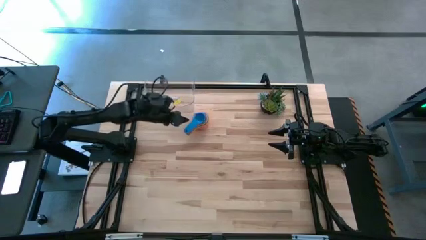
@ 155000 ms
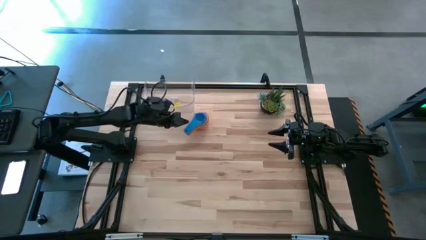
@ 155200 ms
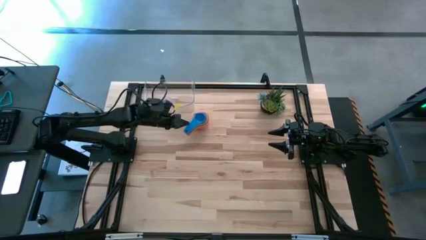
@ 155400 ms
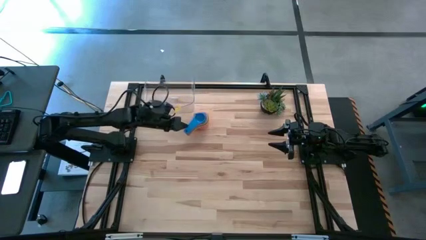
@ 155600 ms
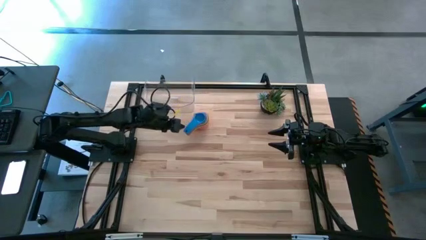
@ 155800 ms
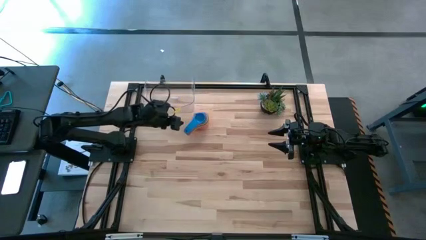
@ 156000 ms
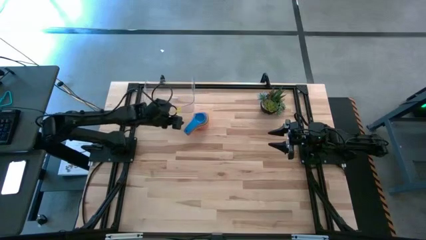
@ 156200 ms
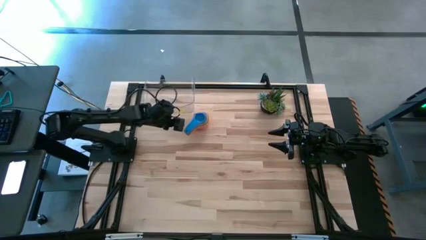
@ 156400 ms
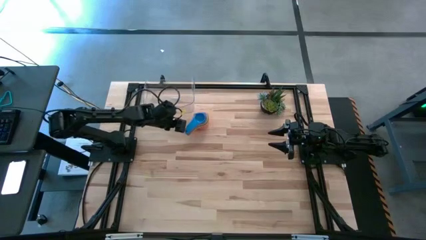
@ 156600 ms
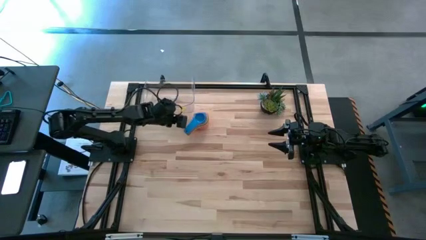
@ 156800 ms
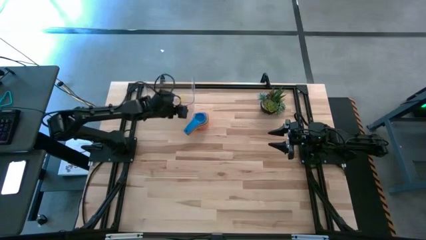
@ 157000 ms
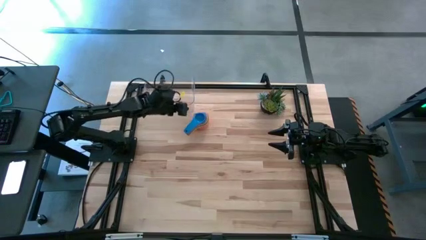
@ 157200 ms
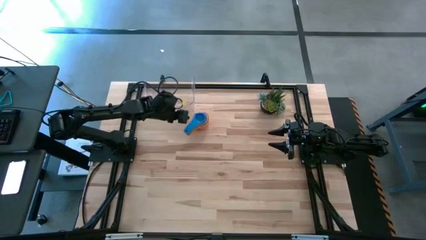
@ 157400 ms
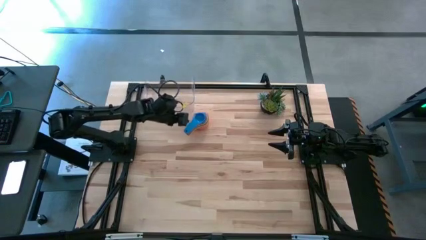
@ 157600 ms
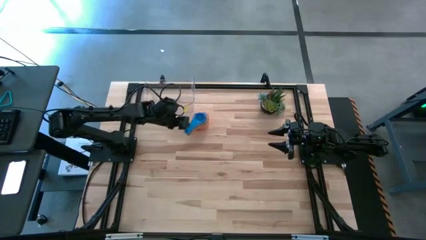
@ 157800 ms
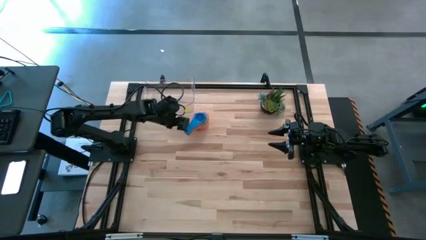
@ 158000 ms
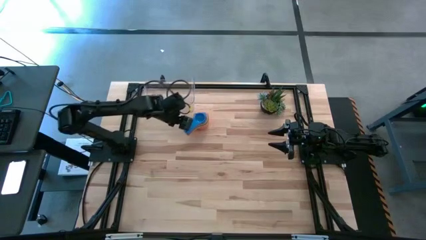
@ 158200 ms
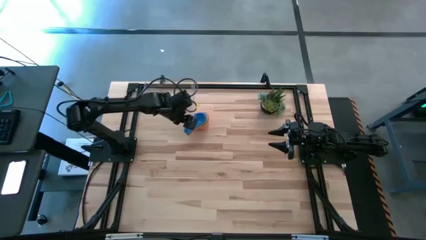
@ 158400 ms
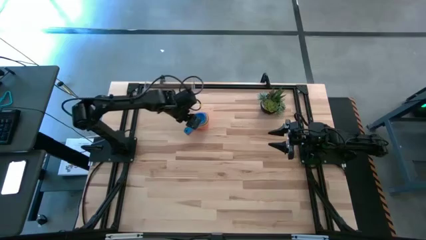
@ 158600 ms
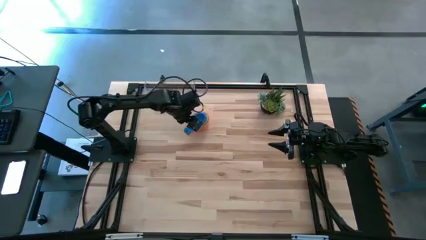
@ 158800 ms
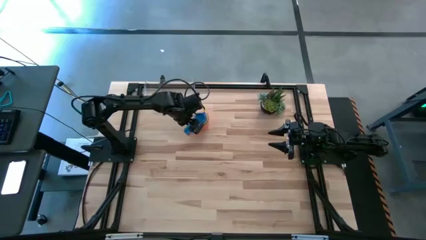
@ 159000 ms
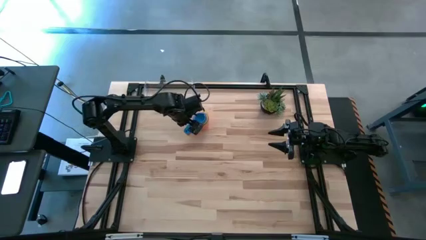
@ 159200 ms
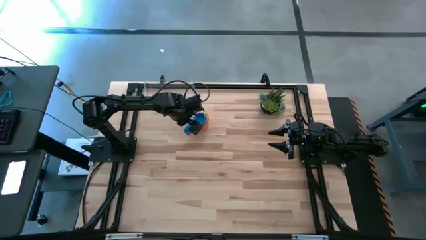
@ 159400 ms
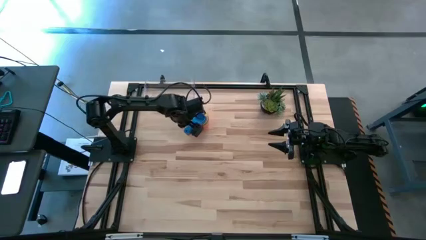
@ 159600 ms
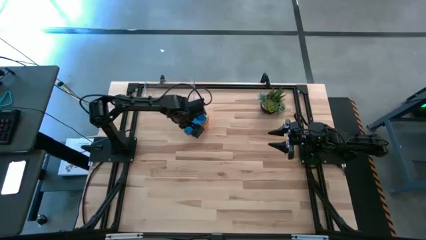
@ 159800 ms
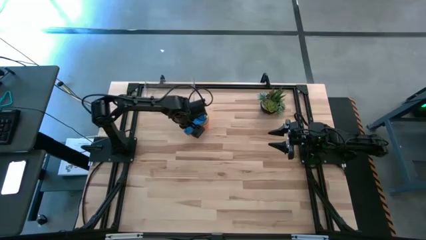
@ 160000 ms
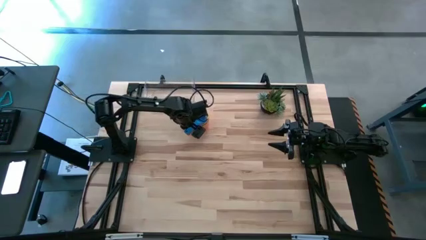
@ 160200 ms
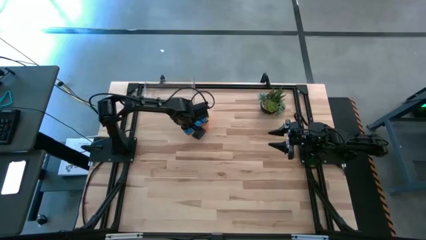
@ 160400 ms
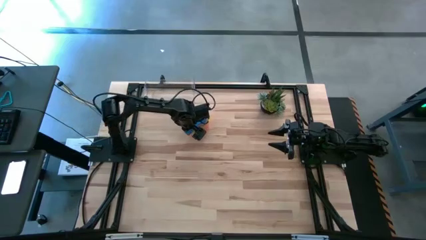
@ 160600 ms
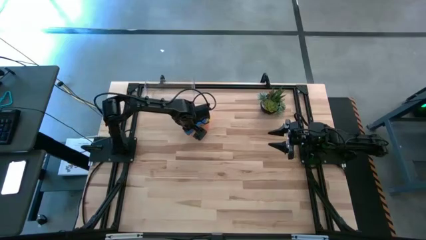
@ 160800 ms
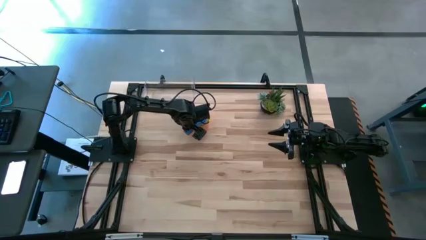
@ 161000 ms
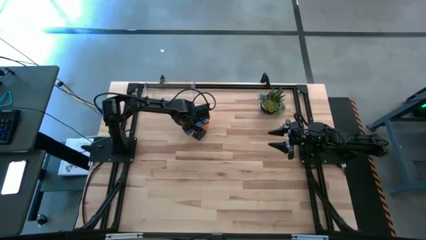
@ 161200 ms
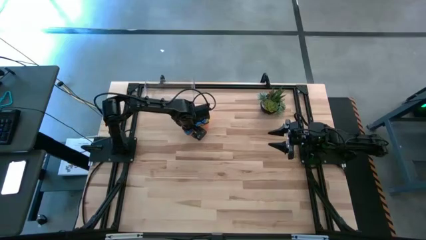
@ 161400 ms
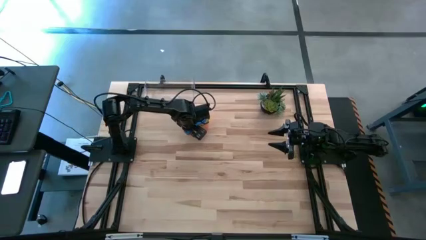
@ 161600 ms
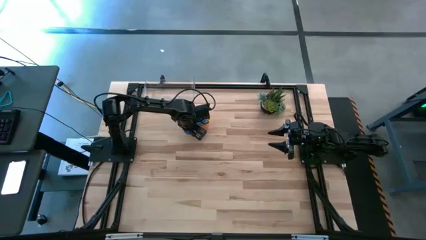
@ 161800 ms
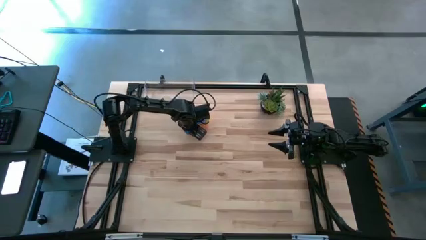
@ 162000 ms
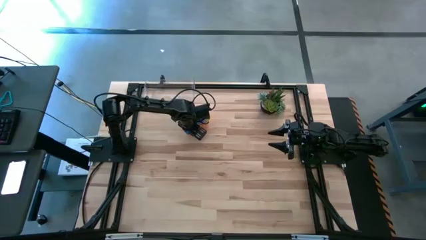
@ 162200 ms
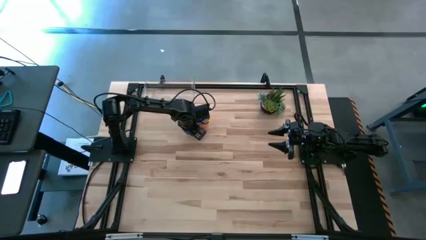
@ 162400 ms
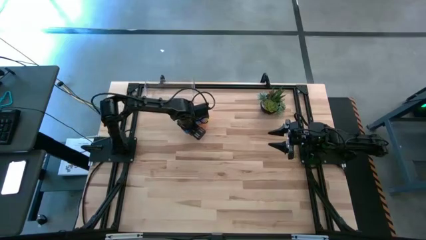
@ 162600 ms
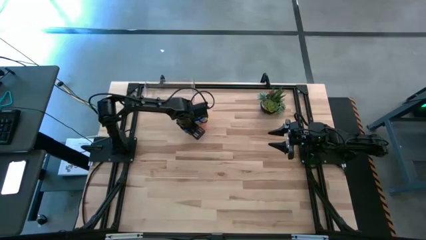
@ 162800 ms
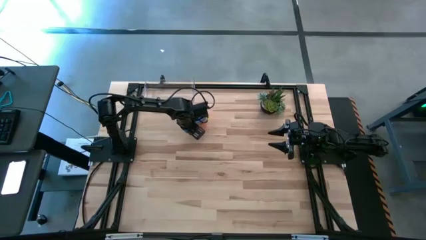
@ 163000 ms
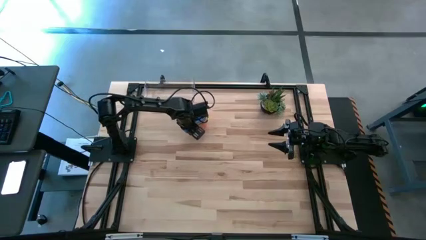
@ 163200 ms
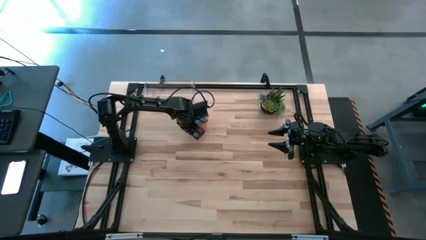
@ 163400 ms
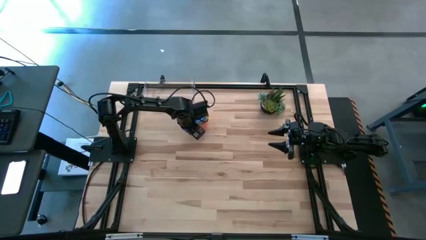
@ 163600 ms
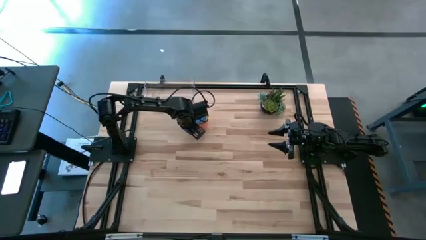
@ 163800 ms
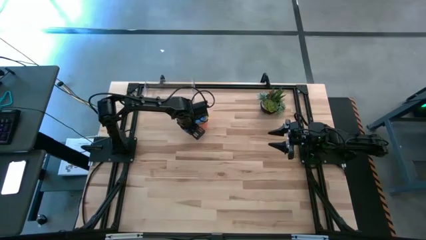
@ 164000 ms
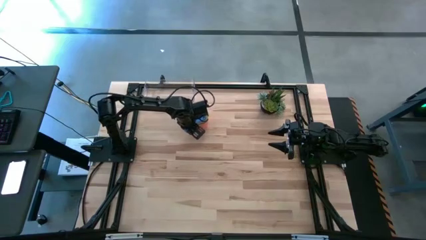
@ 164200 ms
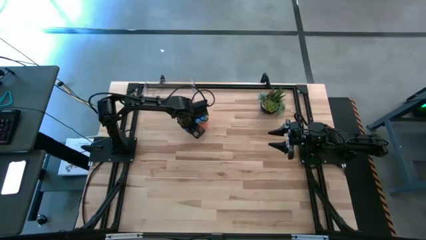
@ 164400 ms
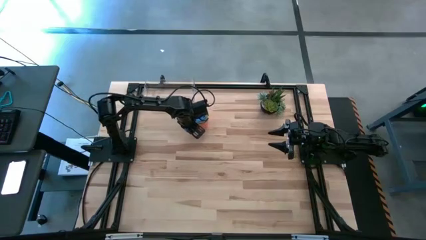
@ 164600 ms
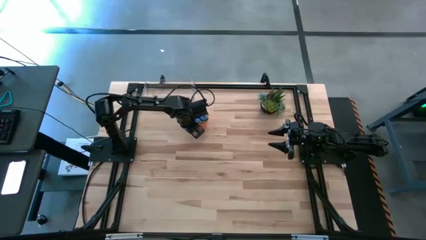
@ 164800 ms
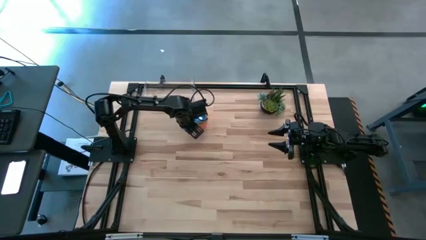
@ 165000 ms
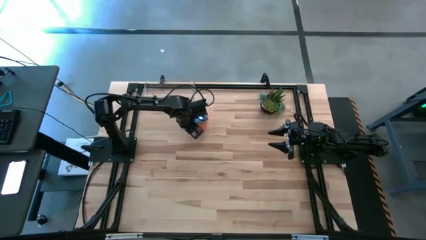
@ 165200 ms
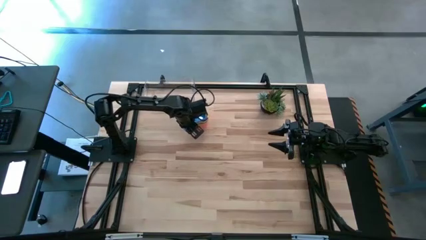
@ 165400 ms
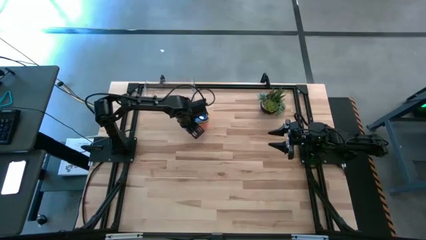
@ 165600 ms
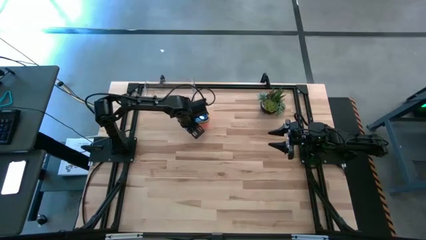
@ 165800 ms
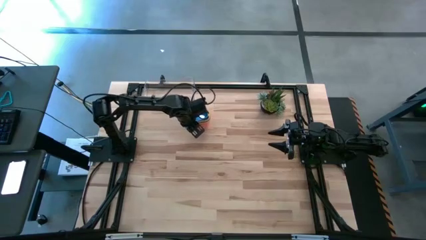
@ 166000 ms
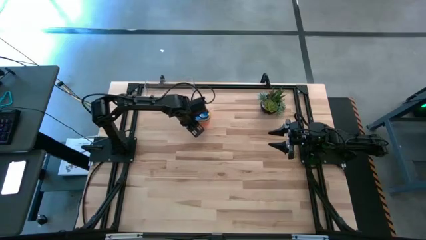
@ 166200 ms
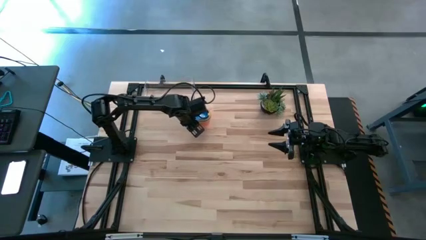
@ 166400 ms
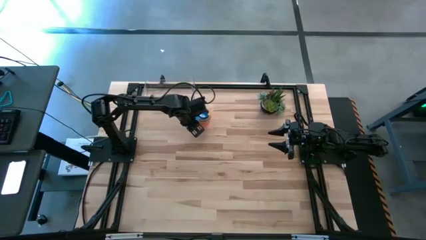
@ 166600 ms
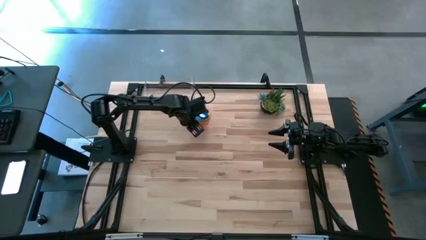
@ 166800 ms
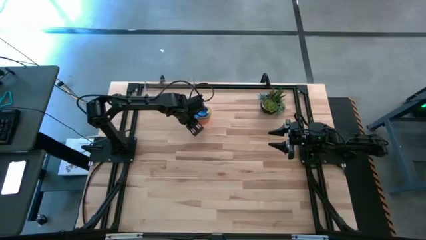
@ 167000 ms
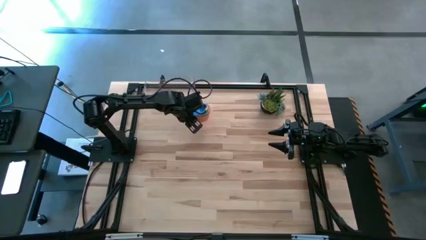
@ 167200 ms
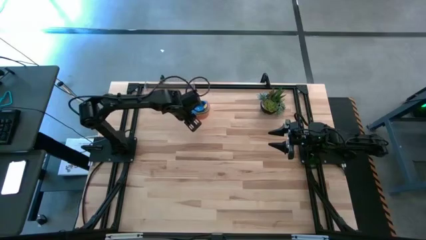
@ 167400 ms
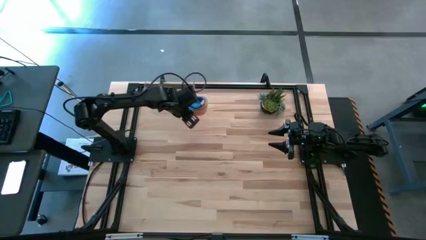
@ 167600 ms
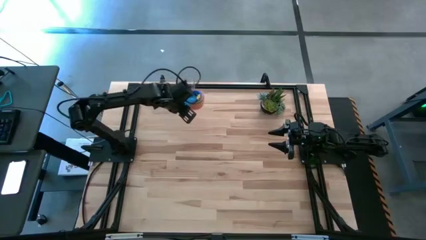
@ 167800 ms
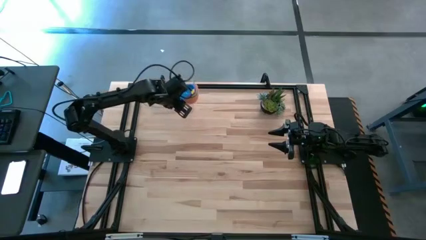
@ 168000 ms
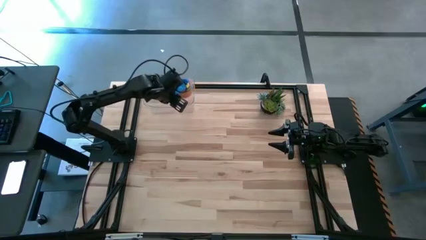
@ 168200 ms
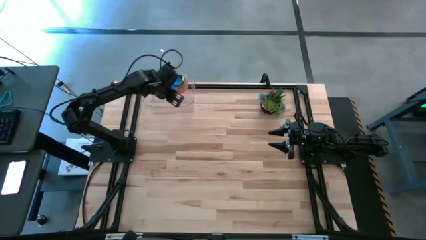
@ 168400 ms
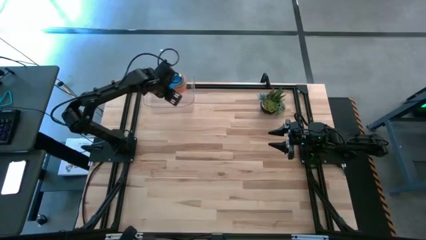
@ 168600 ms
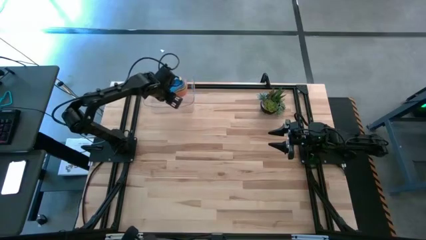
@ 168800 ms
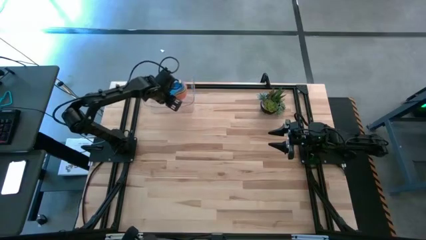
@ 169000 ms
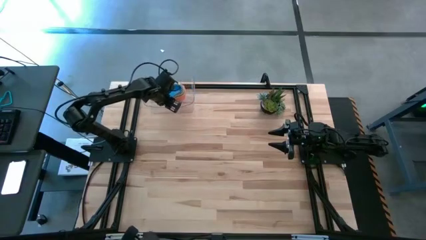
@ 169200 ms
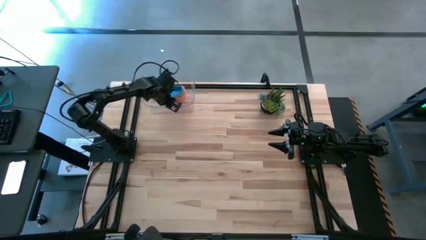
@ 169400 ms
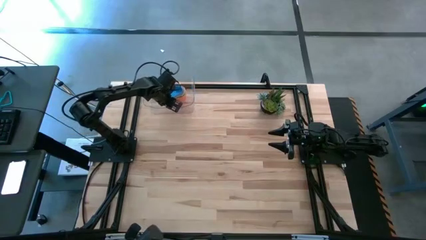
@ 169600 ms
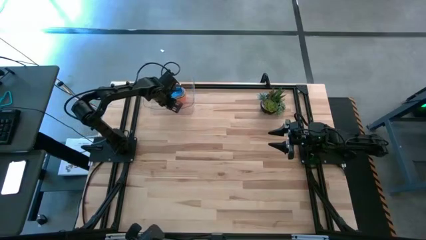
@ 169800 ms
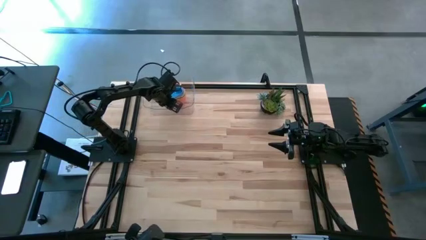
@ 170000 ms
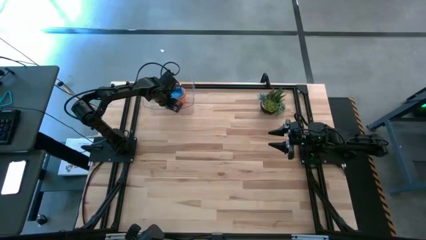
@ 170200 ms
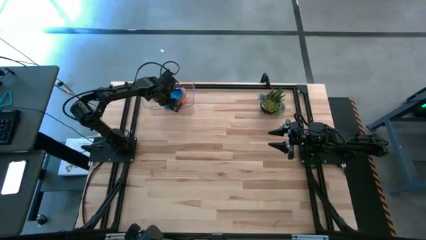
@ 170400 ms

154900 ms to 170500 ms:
Task: Nest measuring cups in basket
Put the stacked colored measuring cups into the transparent bin
